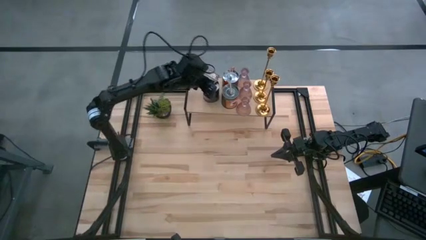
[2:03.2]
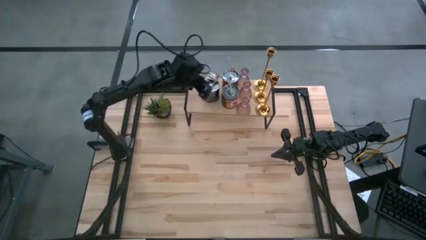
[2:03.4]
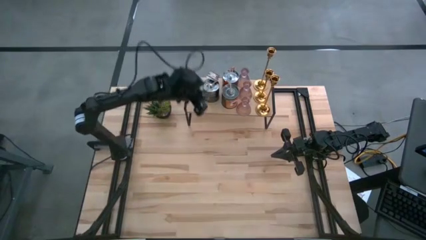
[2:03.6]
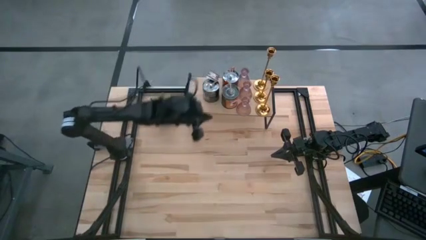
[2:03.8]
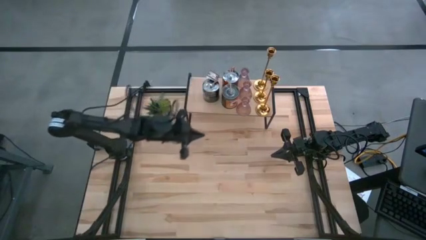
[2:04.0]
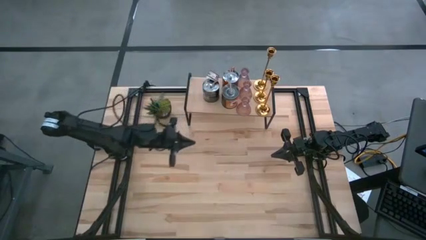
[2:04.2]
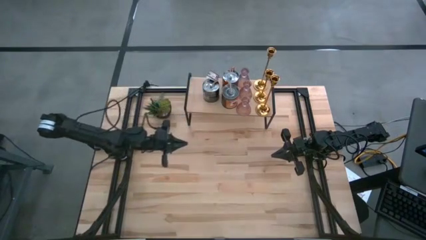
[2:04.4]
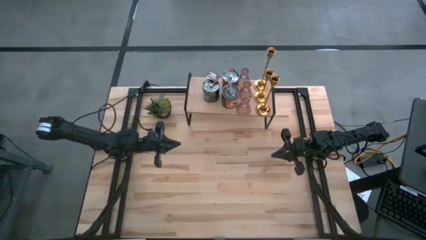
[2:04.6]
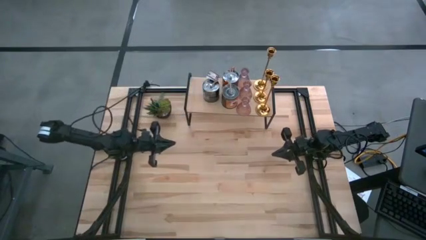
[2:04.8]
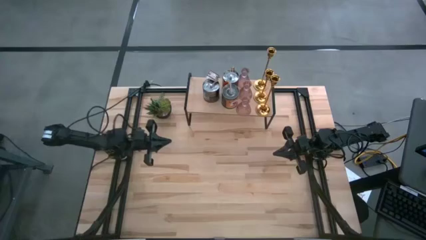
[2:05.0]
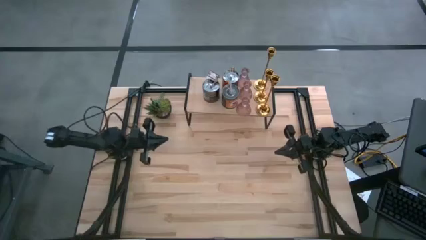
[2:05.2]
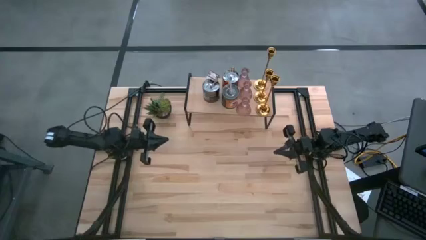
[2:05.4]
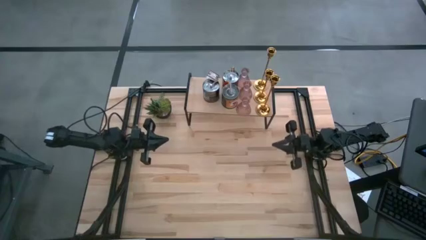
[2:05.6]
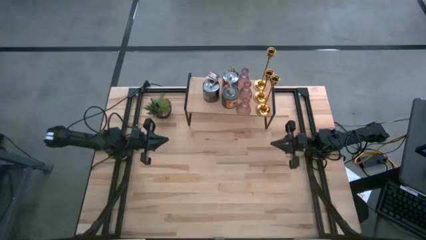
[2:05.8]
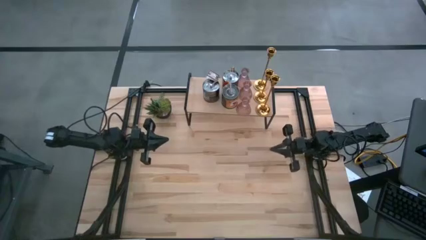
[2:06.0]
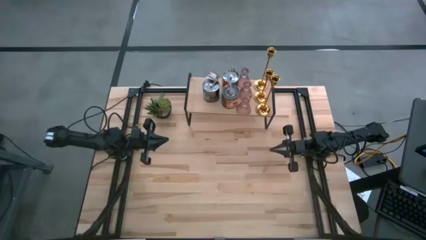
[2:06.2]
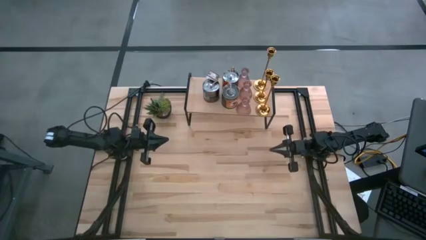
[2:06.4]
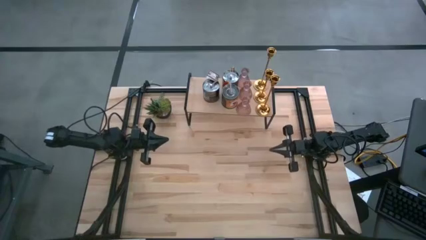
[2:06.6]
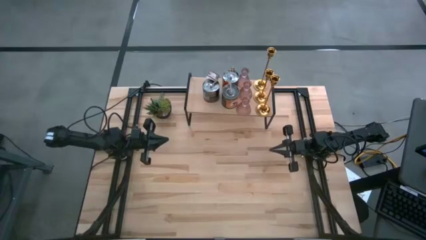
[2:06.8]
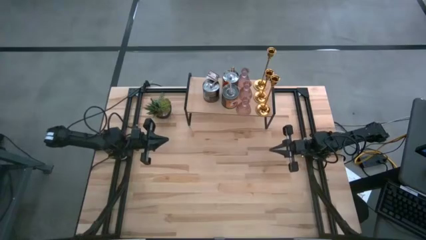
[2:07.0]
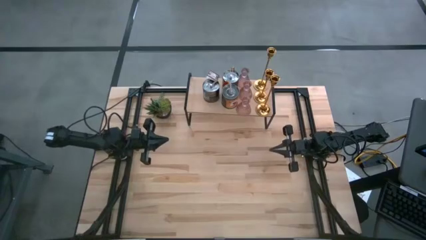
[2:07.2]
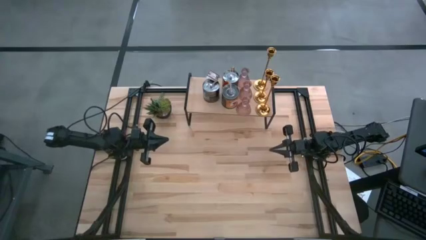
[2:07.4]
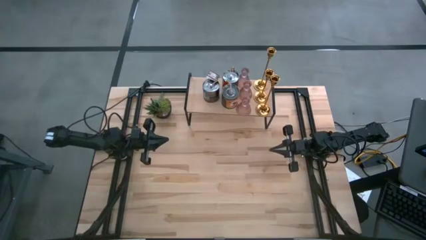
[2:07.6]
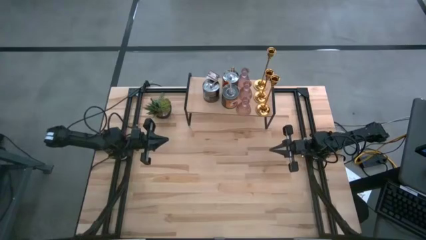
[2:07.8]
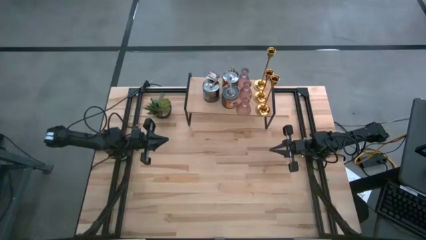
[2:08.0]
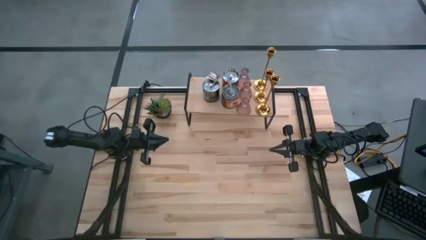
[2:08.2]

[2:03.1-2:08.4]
Task: Pick & Place candle stick holders
Return to Home Position

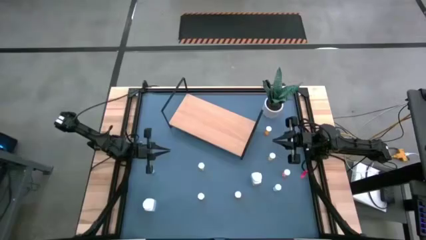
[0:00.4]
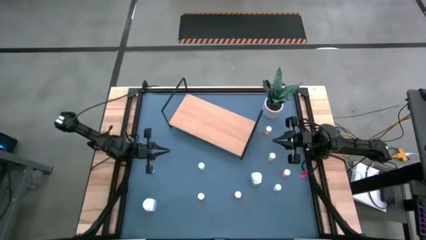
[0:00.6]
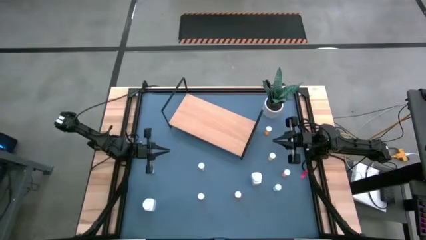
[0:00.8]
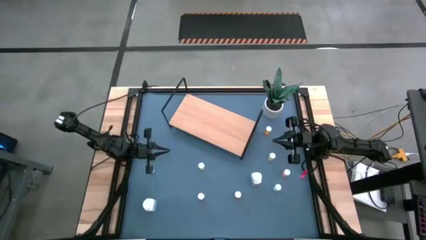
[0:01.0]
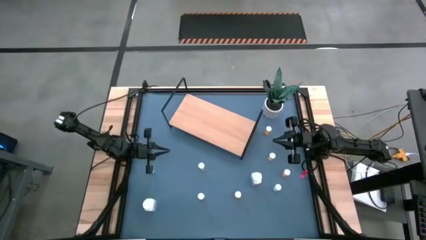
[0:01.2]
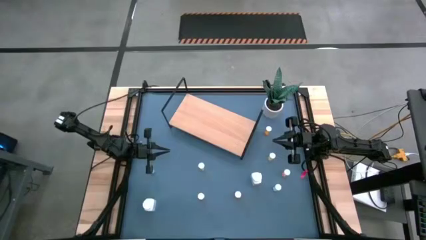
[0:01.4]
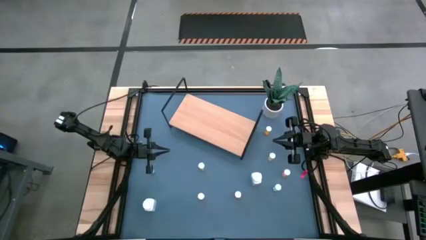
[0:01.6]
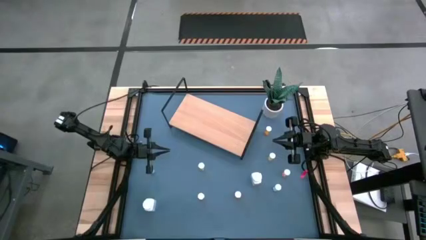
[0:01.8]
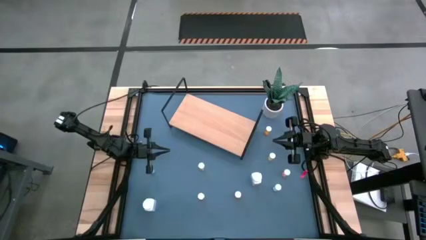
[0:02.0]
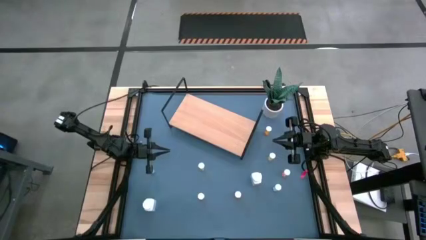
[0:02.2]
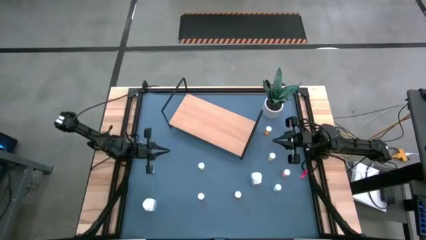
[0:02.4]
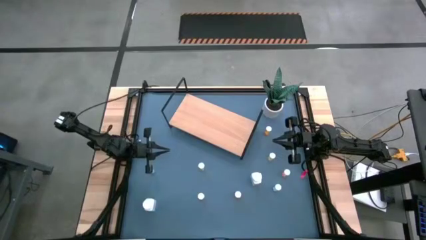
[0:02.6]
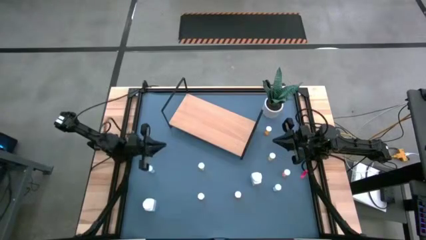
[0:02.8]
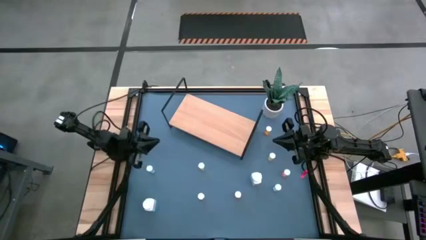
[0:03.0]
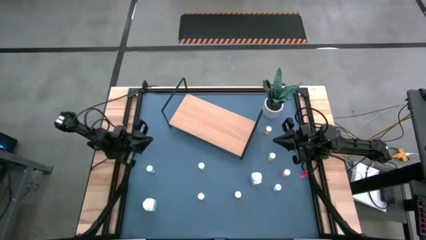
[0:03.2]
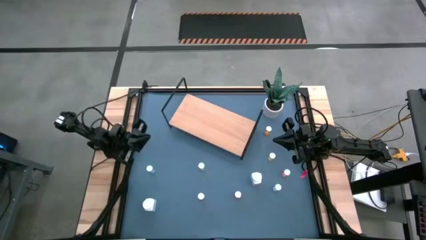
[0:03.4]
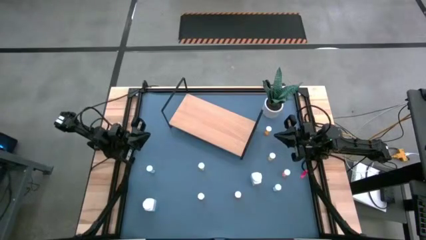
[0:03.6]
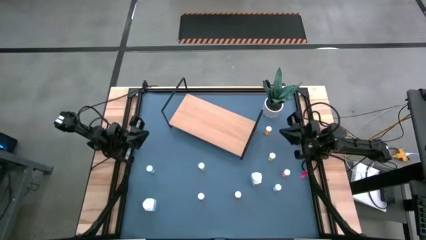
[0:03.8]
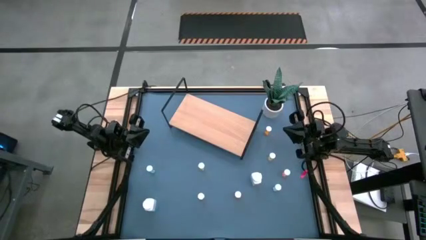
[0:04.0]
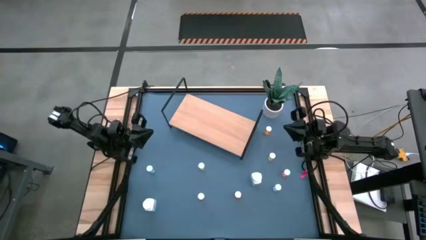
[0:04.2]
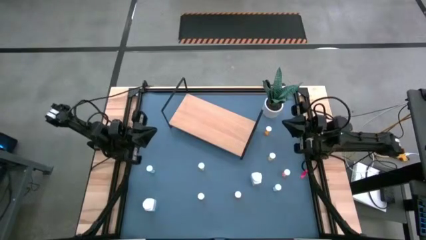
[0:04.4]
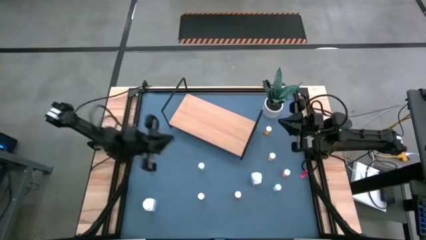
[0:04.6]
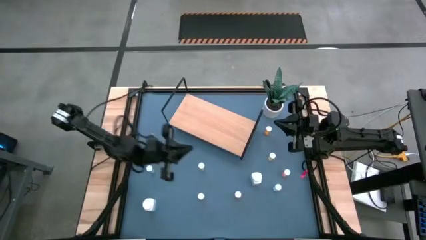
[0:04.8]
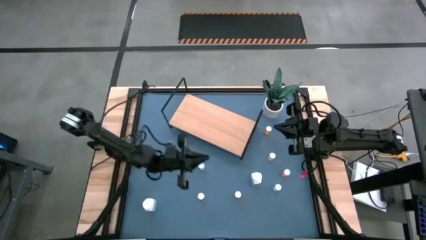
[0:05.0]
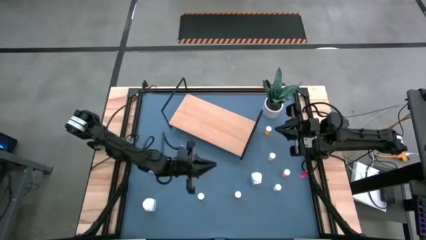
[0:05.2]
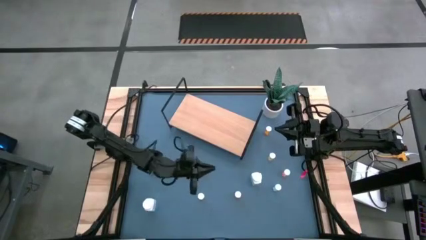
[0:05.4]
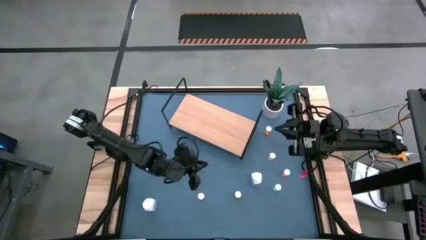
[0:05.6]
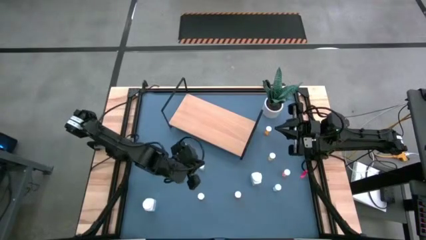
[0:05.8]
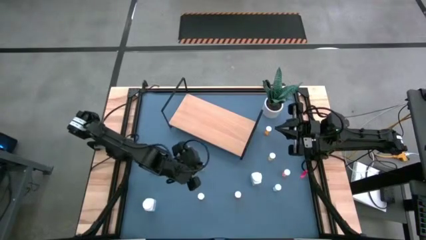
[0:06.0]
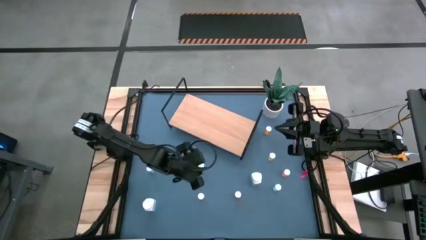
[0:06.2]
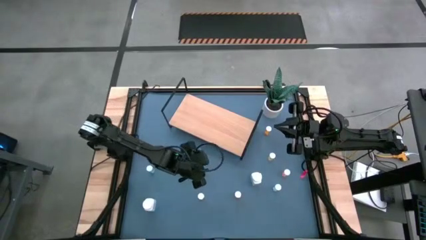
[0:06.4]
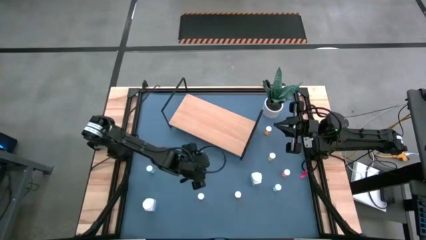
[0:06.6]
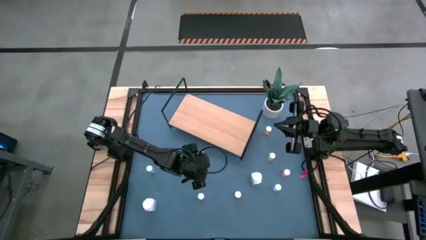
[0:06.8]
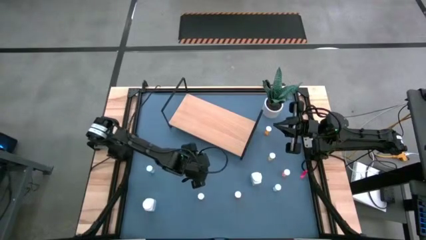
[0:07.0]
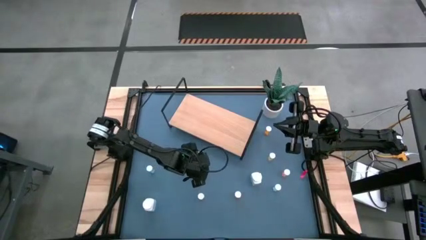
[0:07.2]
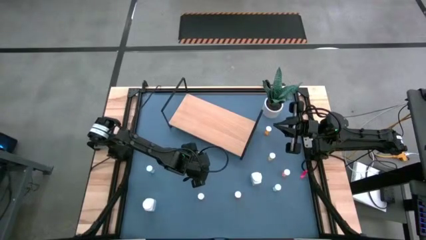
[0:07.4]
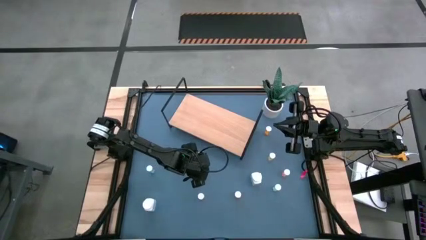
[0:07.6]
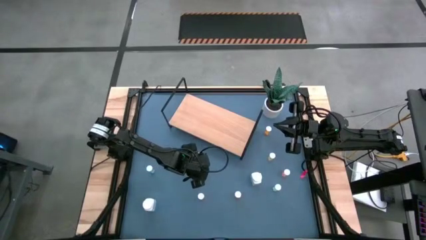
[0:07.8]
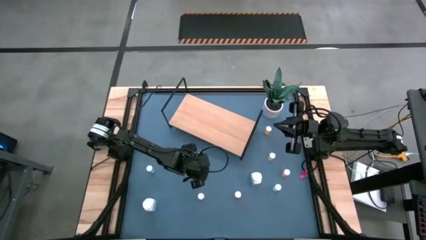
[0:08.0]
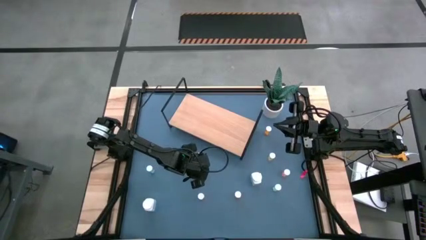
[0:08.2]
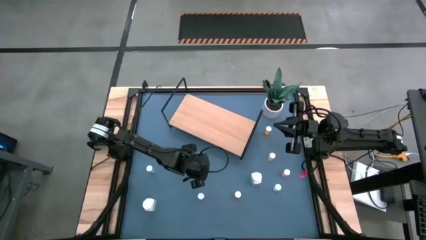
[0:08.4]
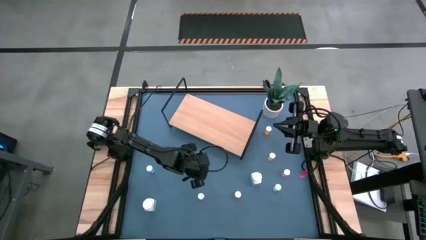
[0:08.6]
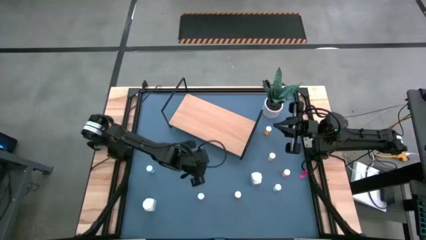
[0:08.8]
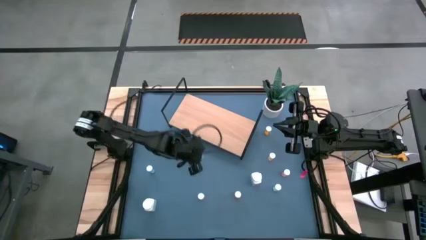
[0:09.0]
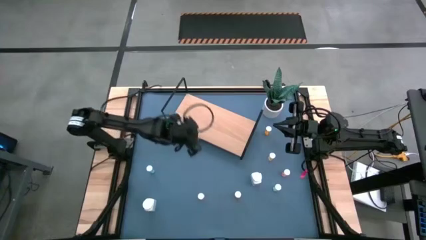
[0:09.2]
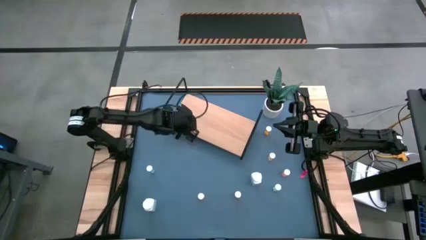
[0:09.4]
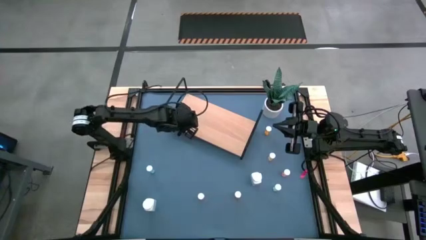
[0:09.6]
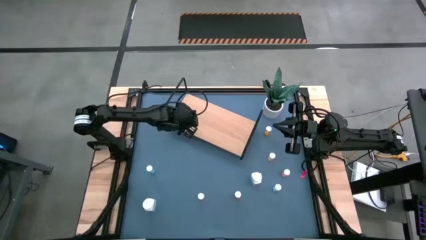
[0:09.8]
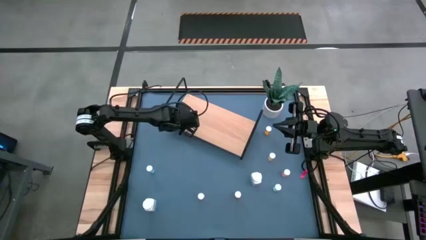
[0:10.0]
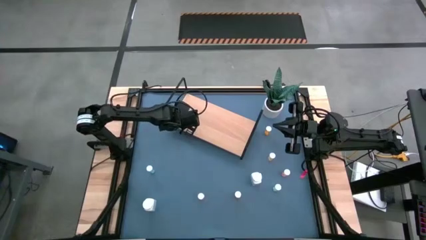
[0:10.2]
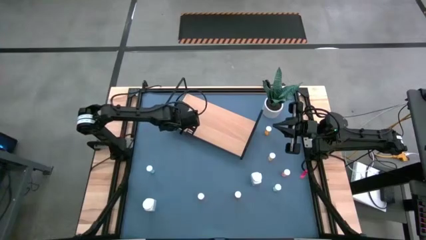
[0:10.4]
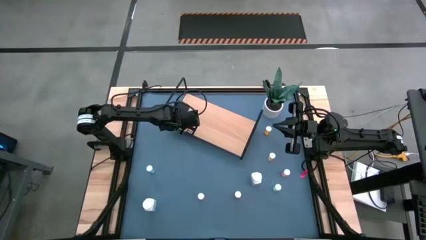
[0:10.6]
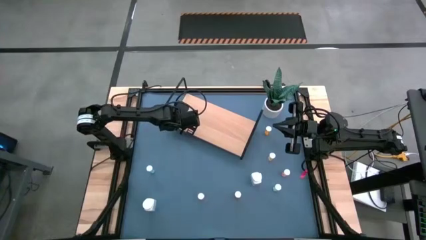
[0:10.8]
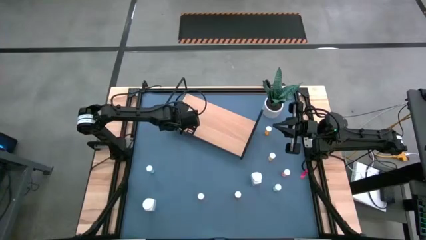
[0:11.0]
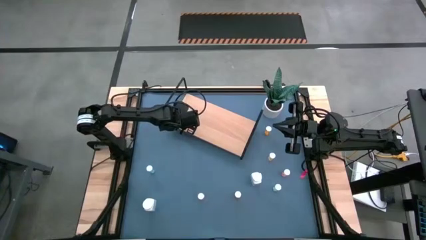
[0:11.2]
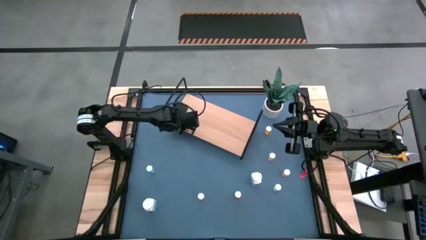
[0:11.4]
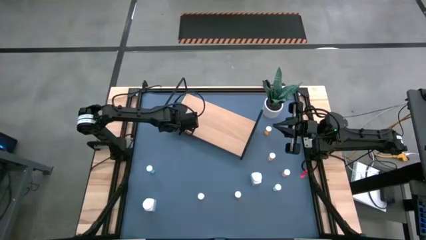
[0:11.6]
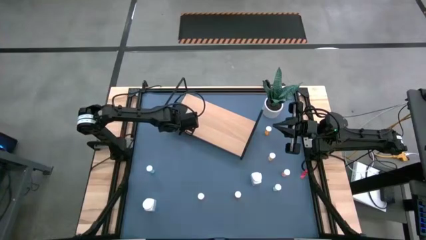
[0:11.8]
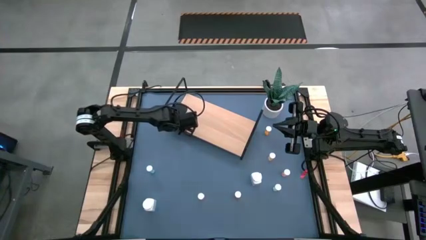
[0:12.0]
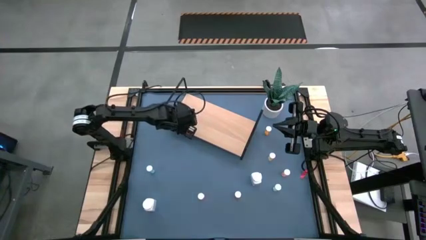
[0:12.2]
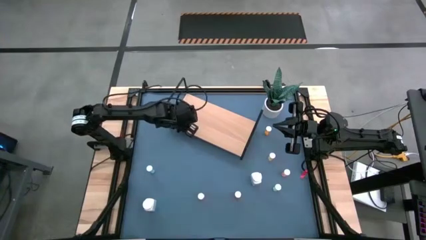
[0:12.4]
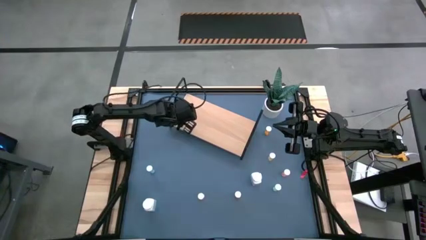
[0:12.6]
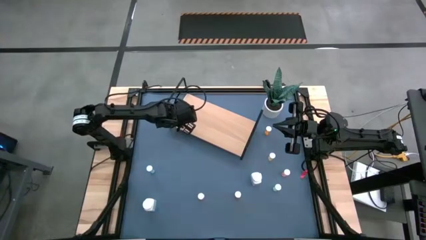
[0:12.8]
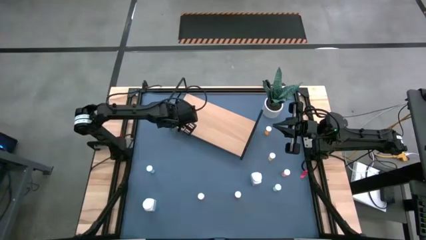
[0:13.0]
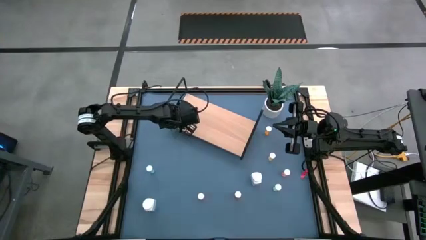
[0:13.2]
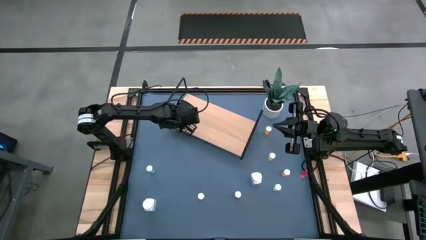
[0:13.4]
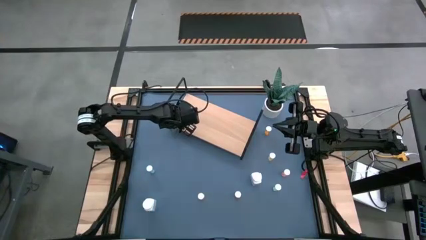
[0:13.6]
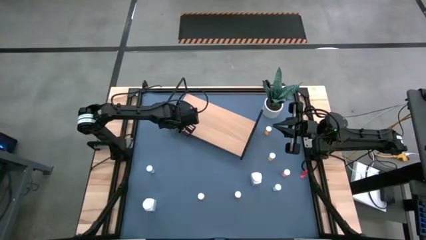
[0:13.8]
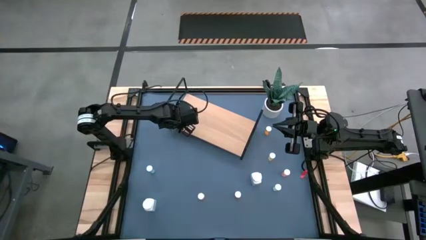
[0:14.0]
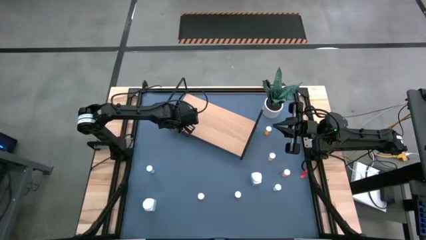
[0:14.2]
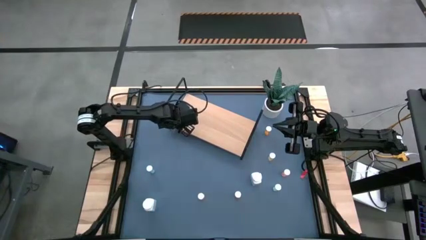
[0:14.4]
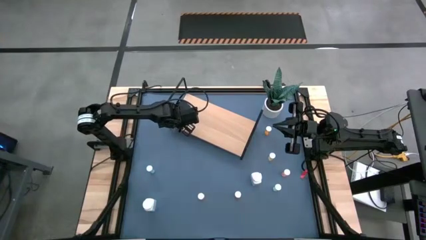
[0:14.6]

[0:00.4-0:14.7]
Task: Pick and place medicine bottles onto shelf by color
Put the left yellow pill bottle on the shelf
